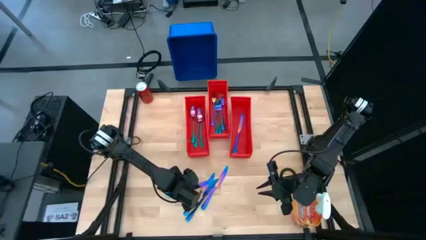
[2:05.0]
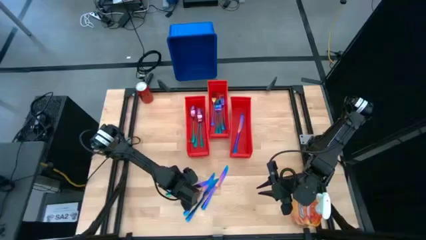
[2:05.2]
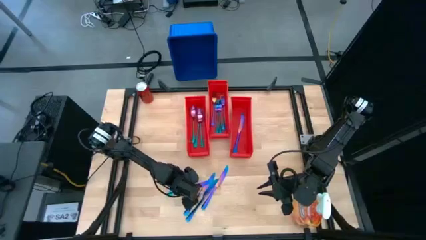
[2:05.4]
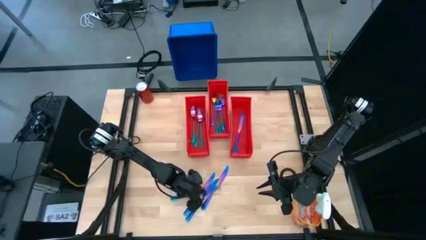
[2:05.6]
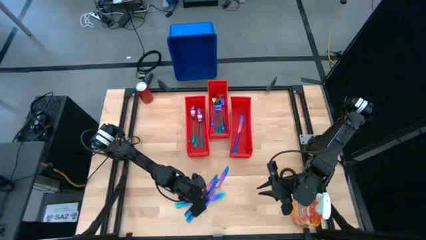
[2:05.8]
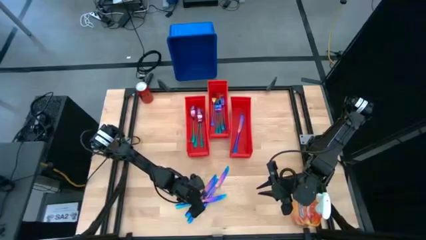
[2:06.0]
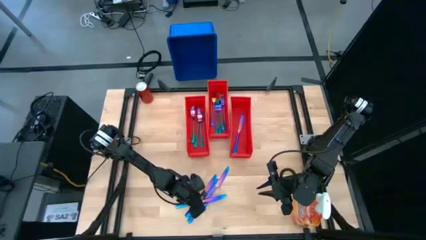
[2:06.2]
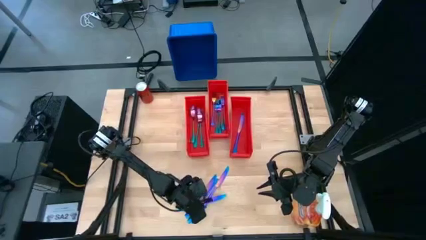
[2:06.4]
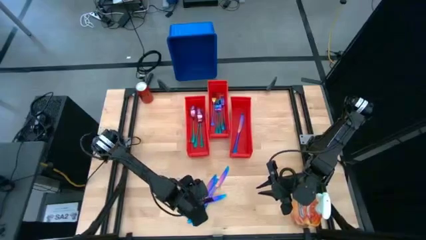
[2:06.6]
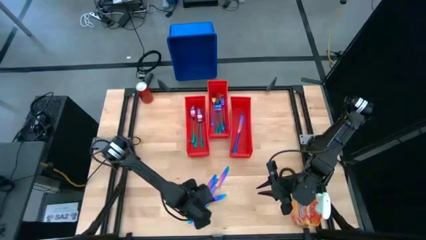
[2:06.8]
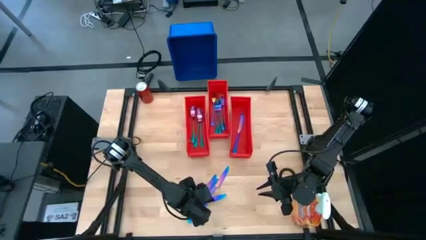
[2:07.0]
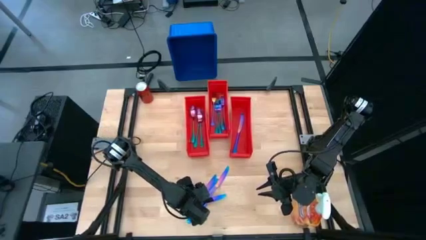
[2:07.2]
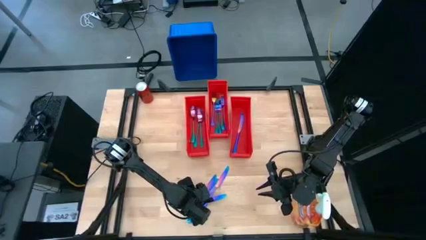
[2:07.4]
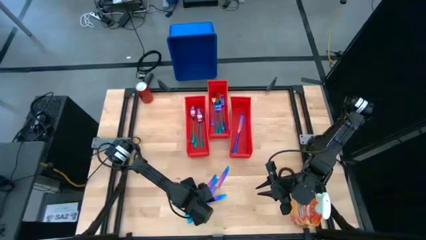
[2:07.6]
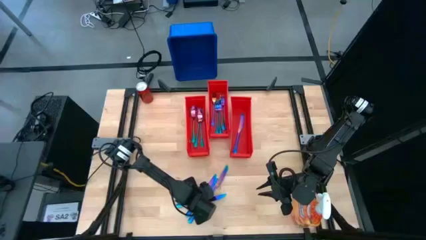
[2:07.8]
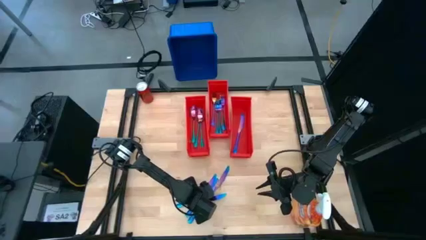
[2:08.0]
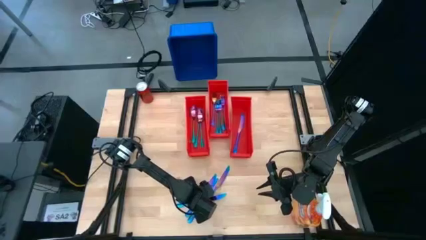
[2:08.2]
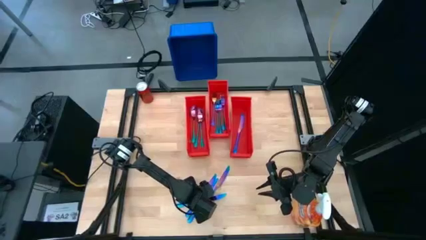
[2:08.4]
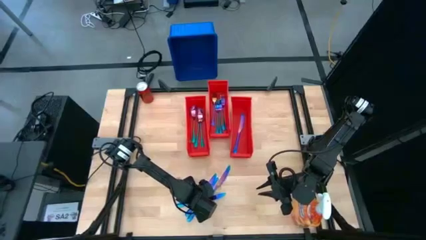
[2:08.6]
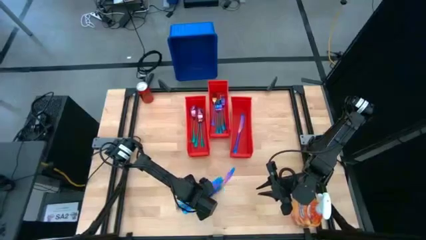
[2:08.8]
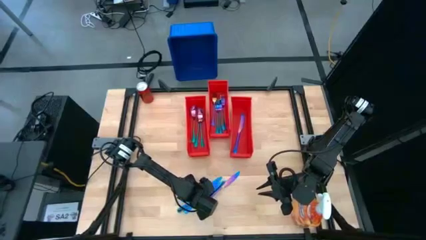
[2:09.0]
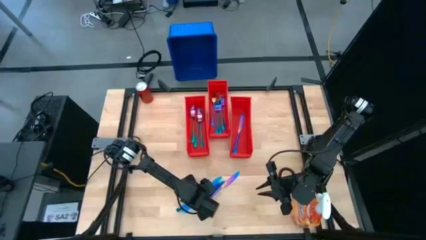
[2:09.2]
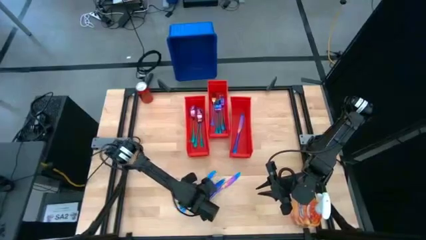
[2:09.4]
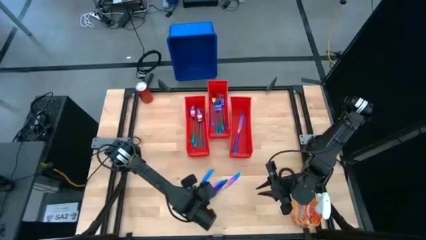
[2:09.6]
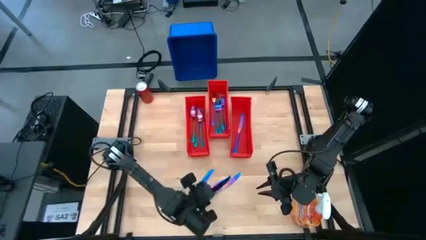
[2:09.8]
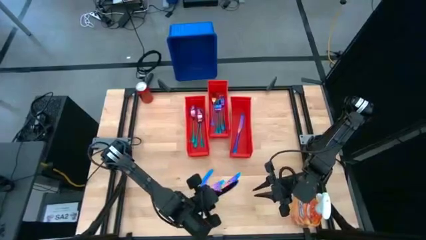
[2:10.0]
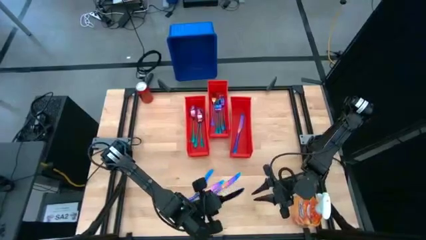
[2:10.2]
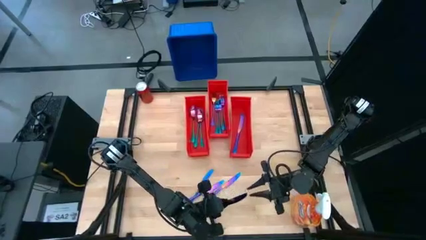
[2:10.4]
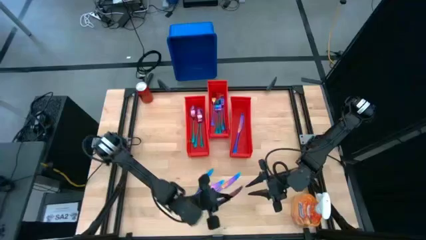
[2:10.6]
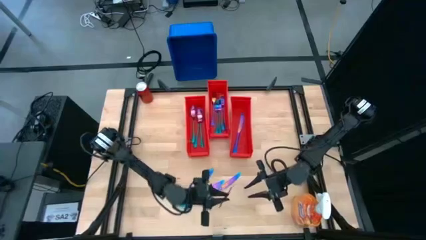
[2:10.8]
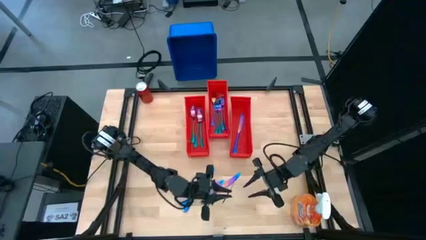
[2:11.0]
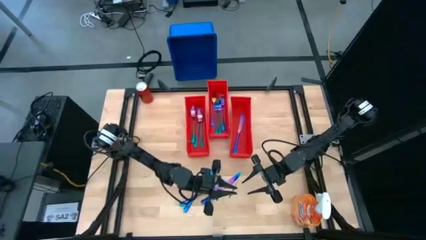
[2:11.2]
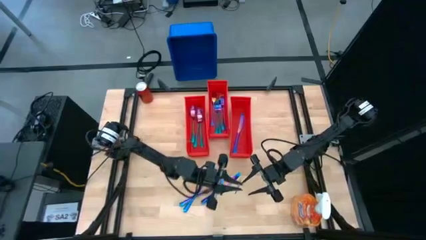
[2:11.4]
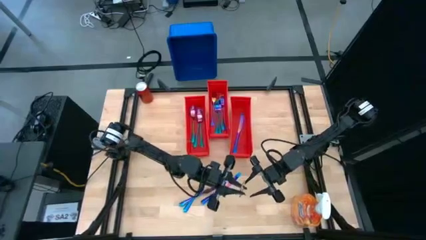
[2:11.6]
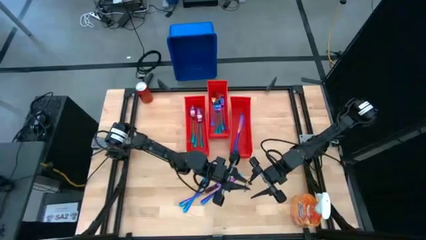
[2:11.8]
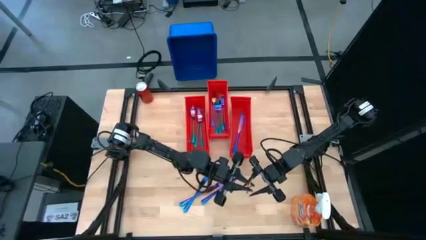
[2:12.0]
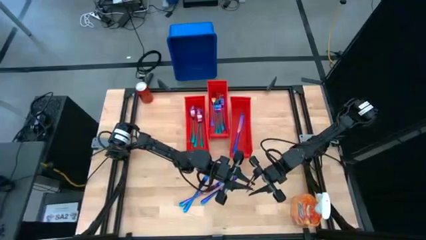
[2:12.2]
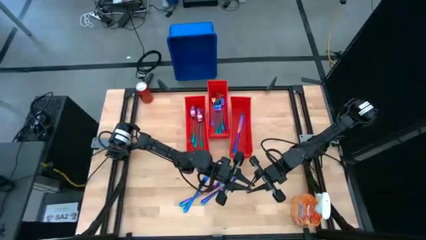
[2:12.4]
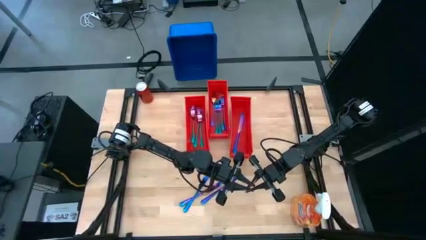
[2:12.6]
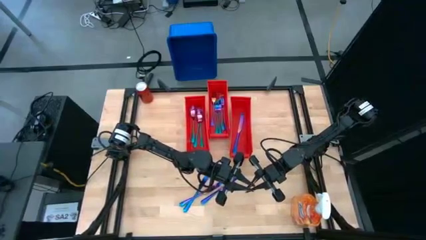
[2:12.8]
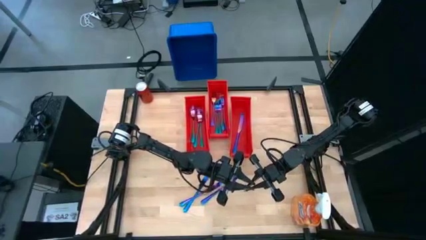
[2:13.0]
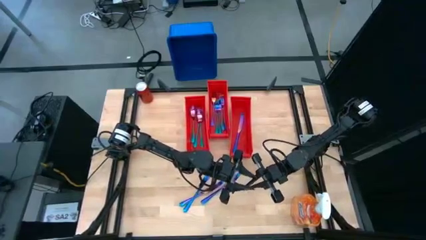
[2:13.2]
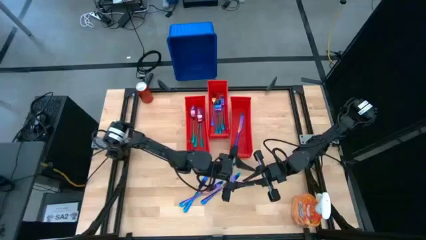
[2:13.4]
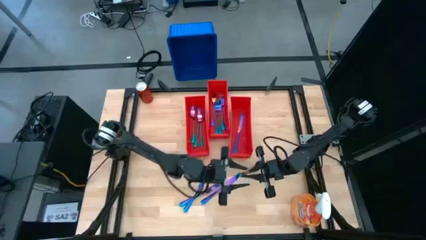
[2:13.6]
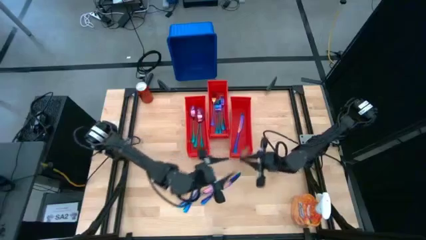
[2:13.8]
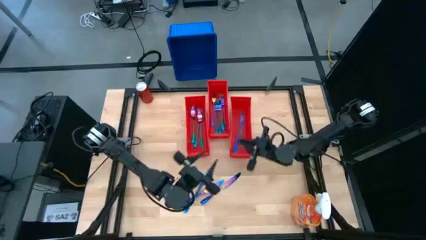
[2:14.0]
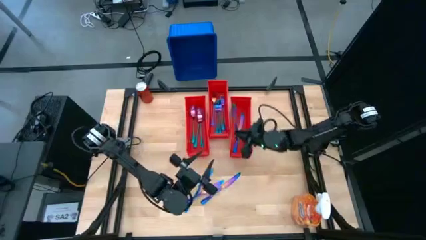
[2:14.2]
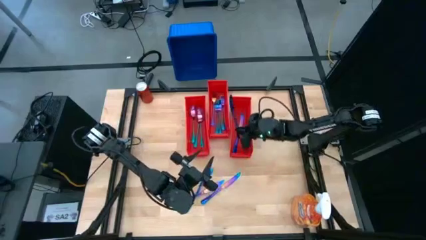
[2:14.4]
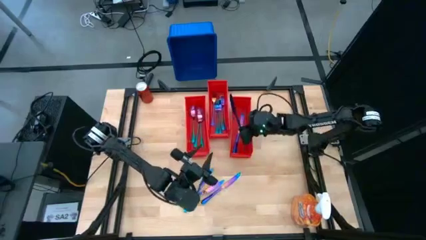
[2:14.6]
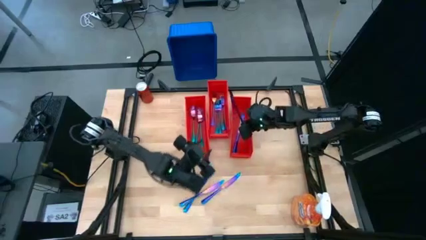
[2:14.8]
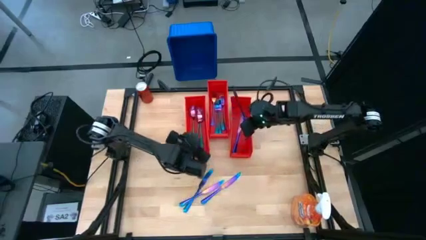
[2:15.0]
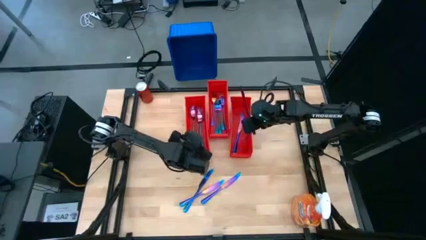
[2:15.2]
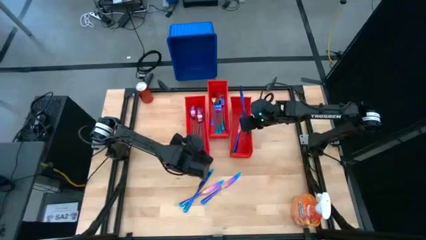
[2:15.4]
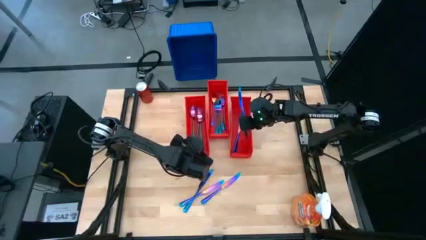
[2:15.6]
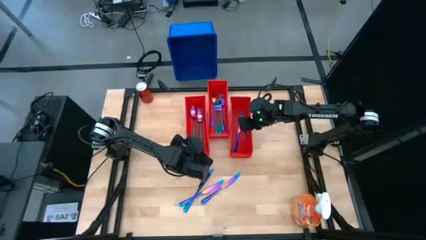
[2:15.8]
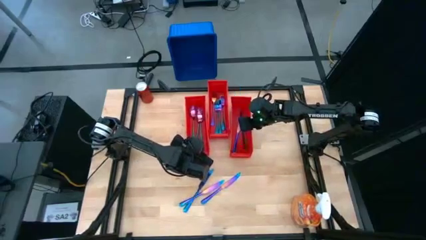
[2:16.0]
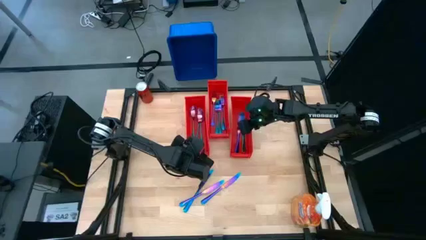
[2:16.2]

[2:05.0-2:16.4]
Task: Sort silverware
Put the iridescent knife into the right orange bin

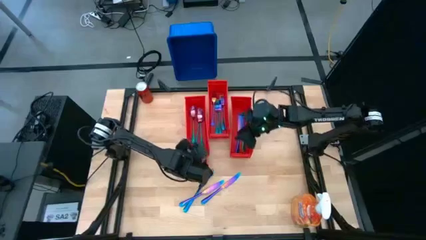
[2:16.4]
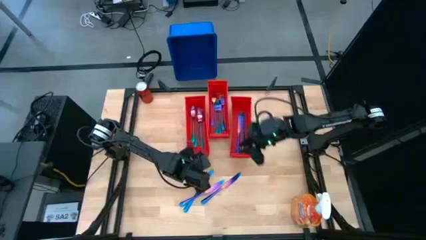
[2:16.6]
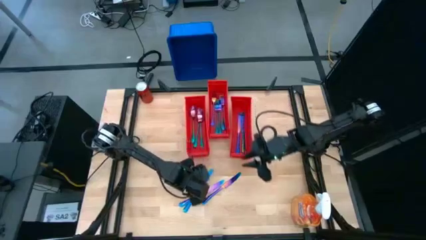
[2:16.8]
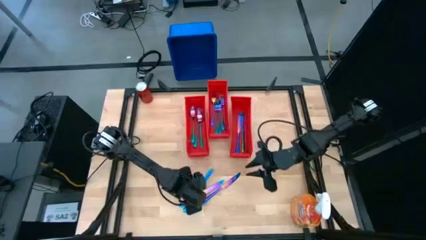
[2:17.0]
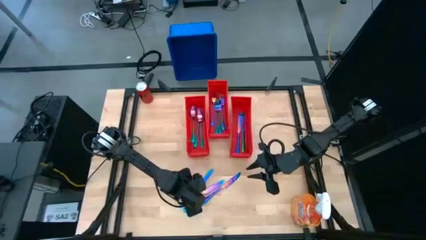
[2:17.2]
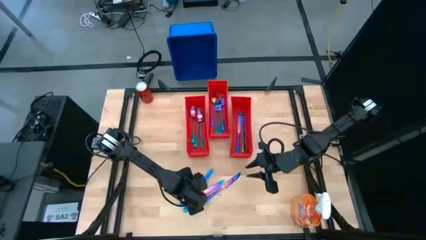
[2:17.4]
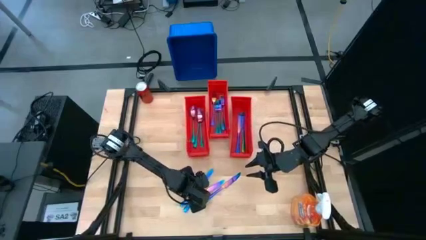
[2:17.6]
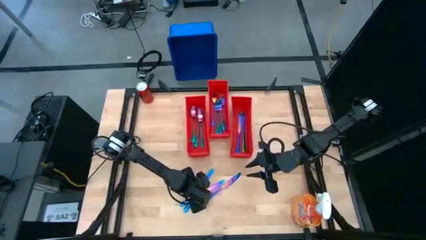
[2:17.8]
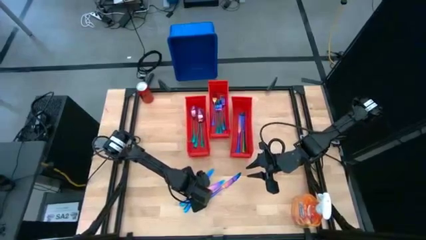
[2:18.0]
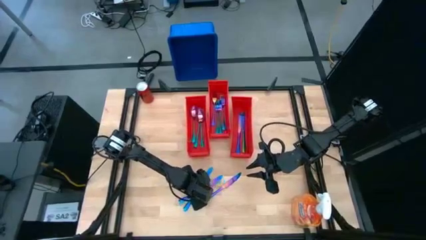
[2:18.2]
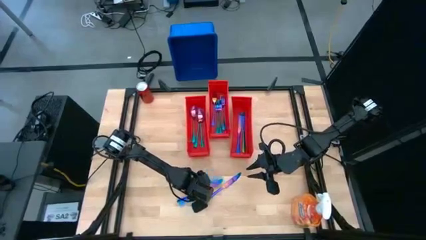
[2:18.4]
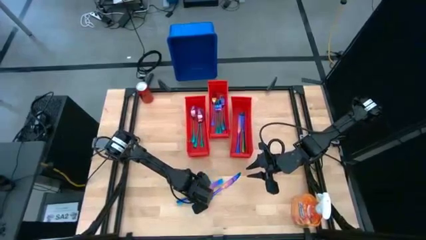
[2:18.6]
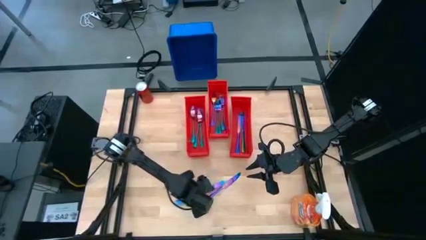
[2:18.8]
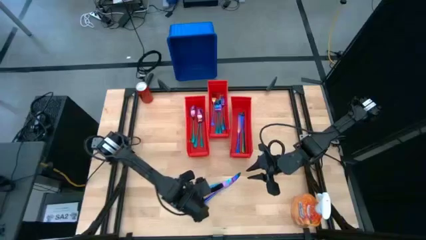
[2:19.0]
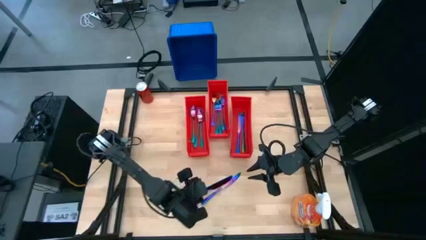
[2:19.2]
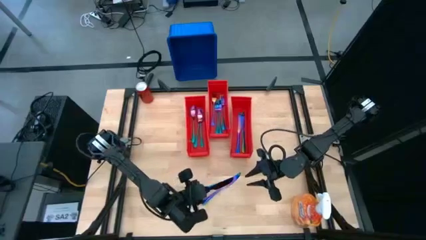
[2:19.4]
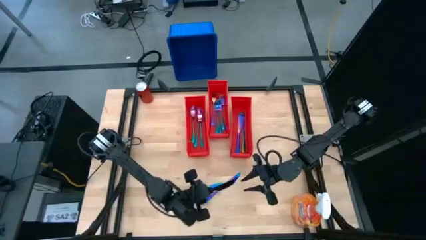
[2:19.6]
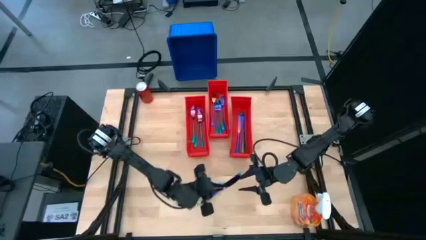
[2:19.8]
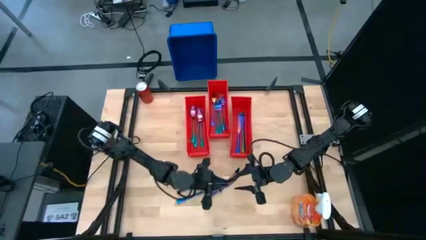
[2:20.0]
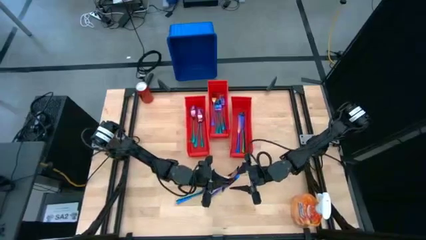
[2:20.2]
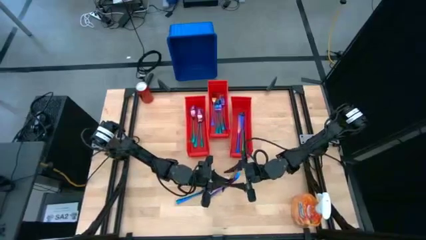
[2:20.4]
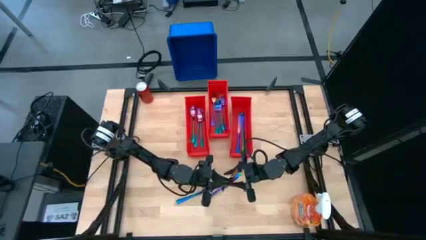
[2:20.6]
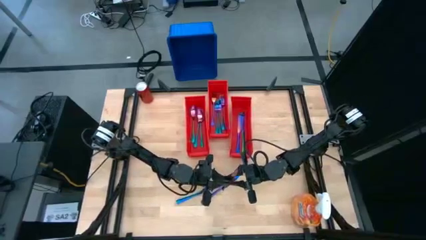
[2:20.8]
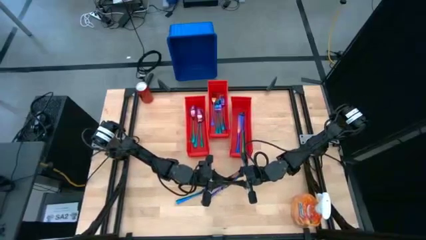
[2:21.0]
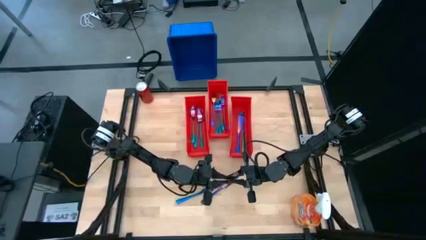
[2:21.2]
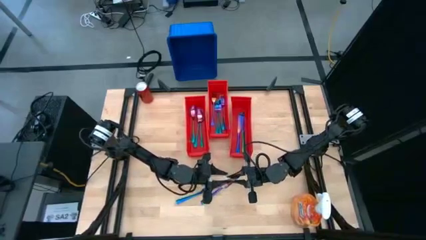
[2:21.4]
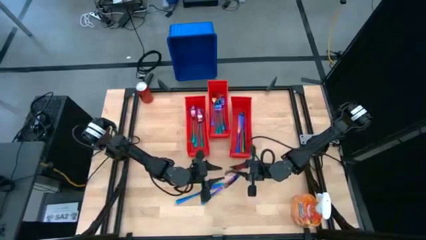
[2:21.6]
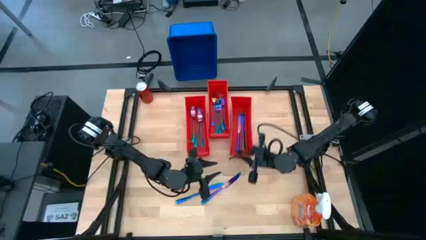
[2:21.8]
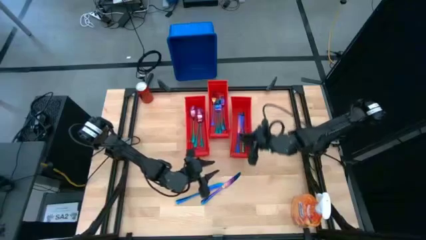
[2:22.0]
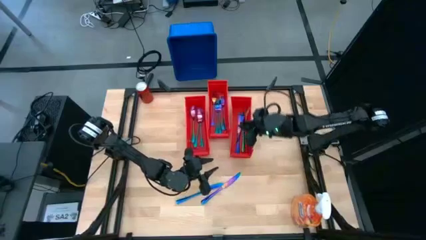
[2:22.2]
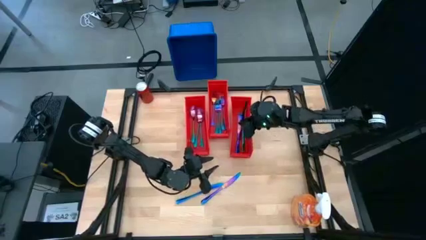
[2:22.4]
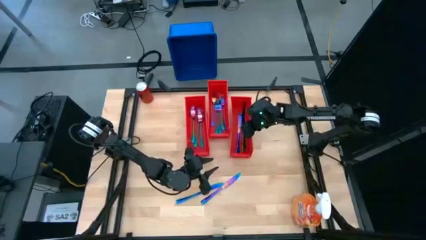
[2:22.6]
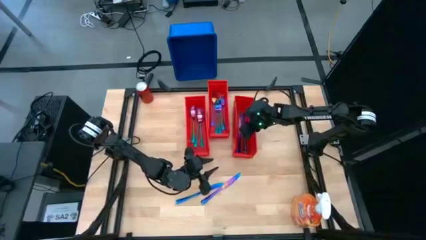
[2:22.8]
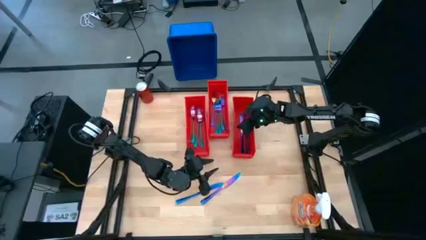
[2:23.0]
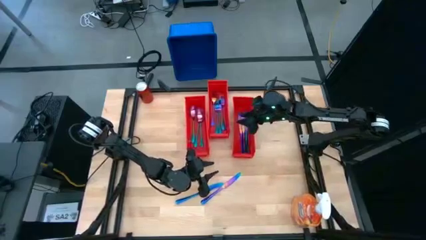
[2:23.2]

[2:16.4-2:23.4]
Put the iridescent knife into the right orange bin
